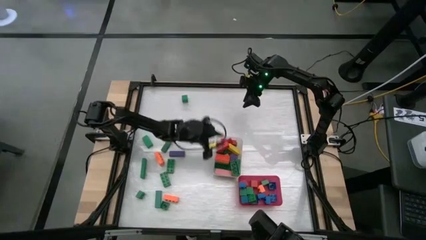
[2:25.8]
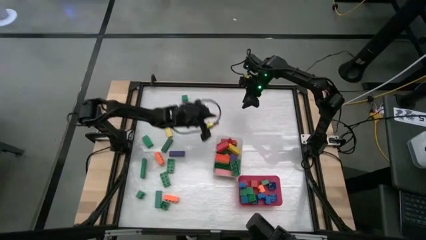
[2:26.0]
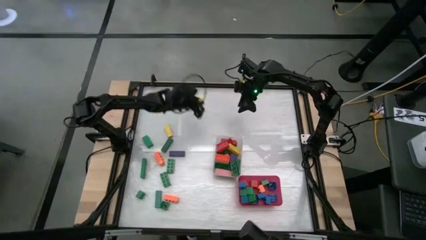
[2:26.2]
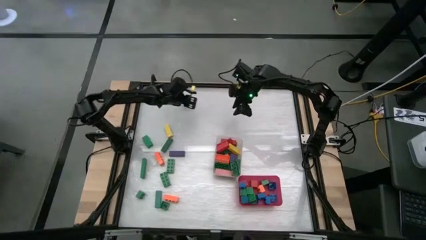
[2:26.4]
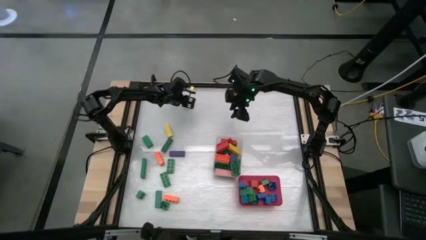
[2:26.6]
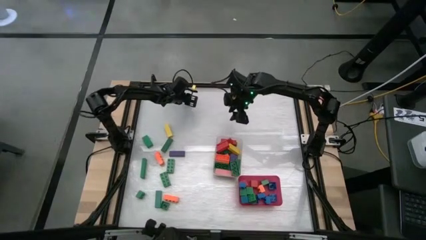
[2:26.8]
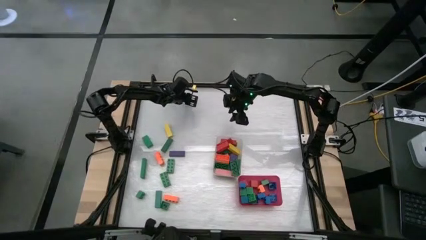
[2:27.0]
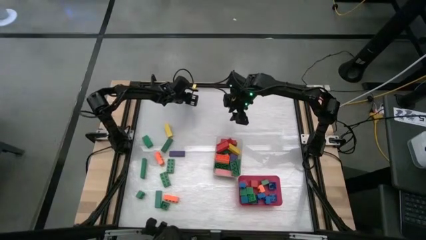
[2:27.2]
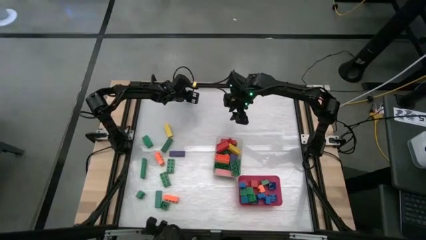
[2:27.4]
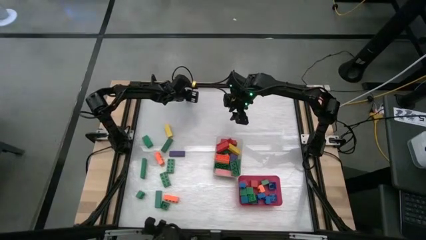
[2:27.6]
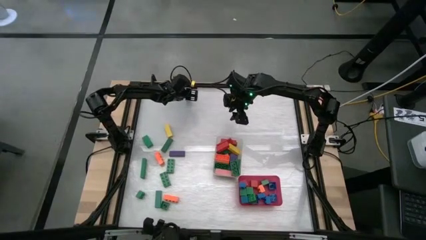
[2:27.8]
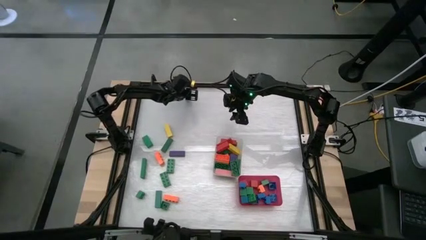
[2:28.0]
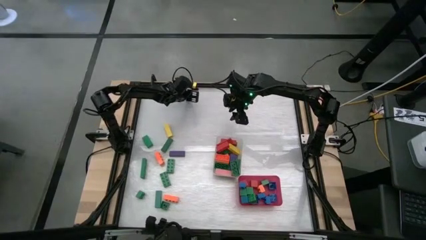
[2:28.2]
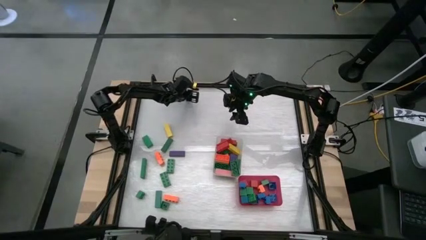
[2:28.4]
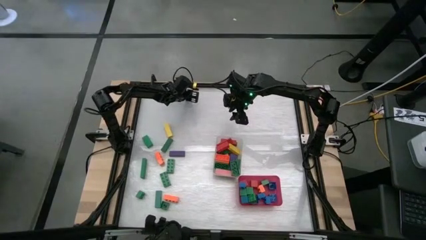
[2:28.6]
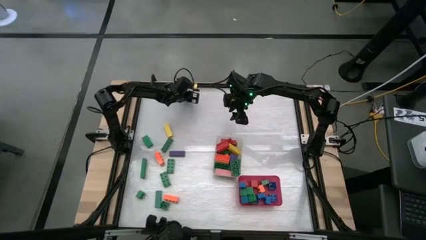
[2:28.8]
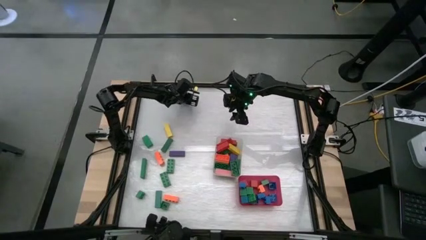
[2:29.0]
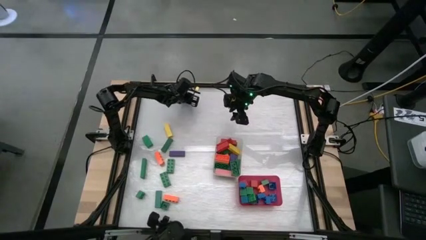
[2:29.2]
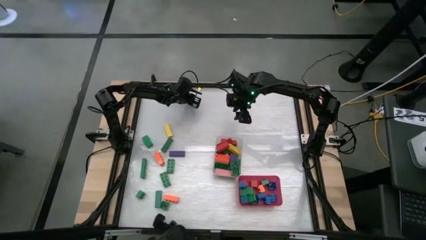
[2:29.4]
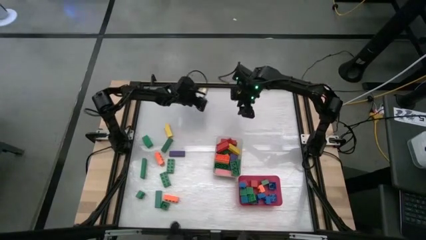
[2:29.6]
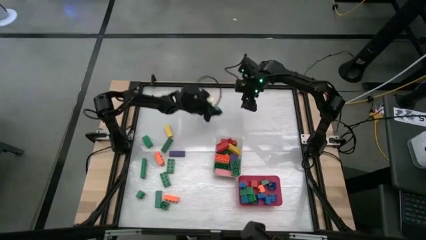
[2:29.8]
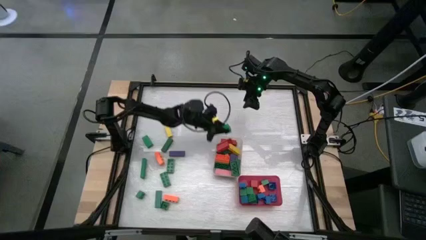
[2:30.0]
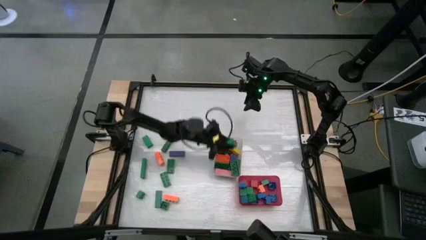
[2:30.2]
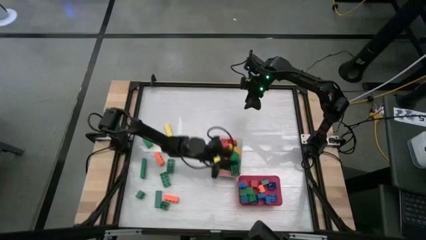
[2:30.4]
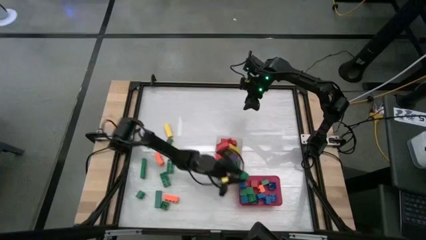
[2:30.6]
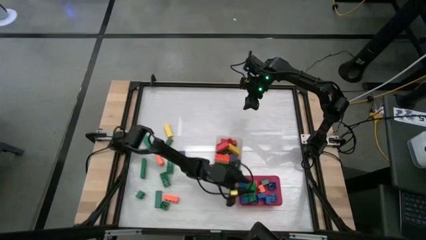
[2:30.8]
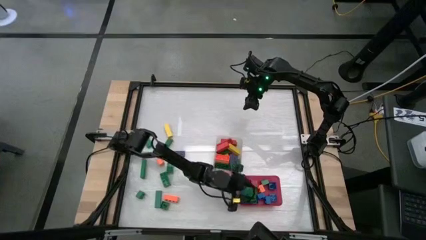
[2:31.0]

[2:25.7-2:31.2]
Task: Sort blocks by size
Put the green square block into the red bin

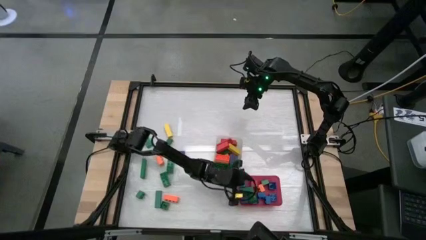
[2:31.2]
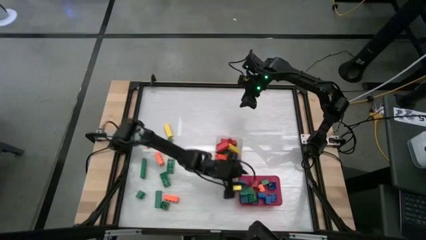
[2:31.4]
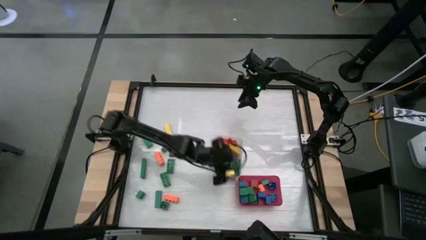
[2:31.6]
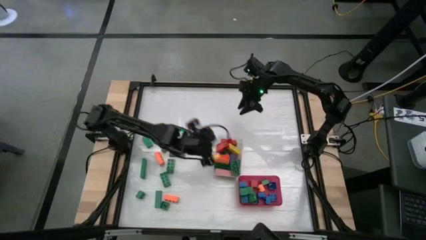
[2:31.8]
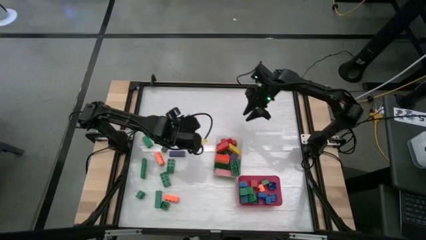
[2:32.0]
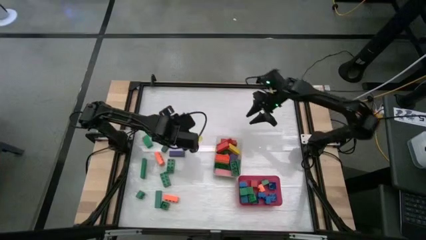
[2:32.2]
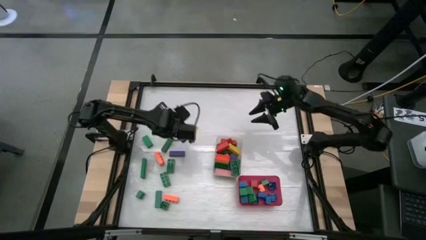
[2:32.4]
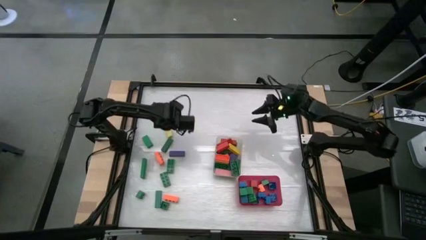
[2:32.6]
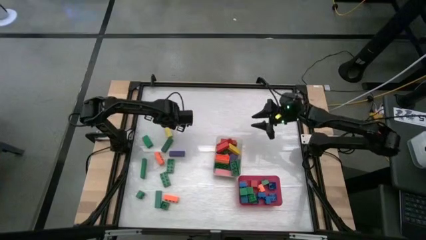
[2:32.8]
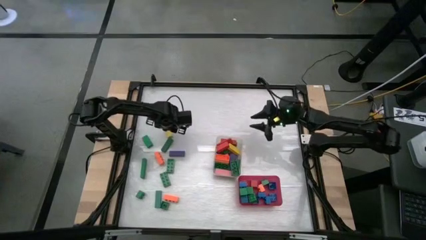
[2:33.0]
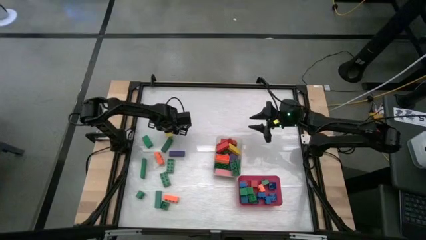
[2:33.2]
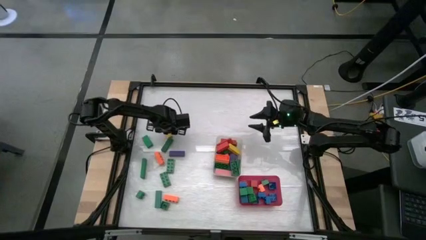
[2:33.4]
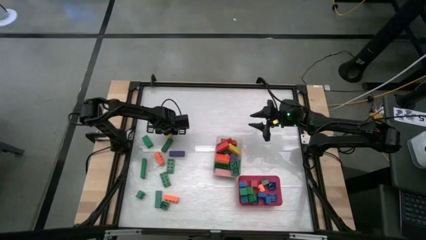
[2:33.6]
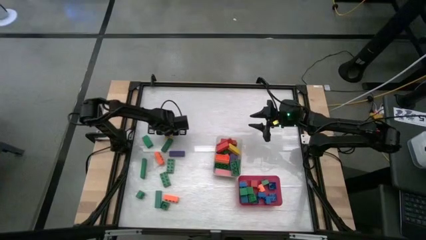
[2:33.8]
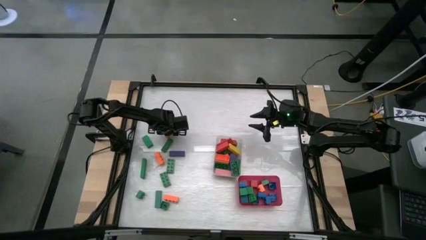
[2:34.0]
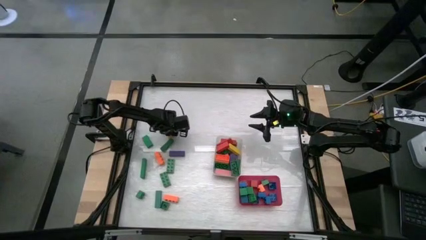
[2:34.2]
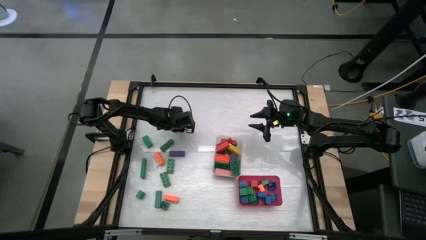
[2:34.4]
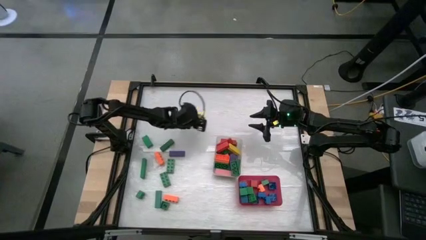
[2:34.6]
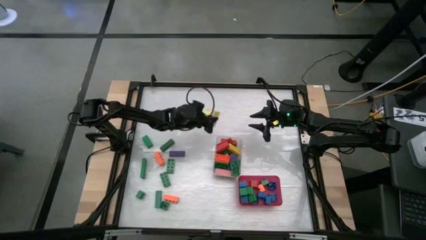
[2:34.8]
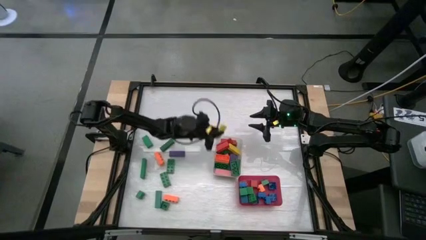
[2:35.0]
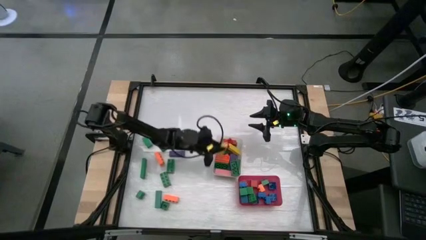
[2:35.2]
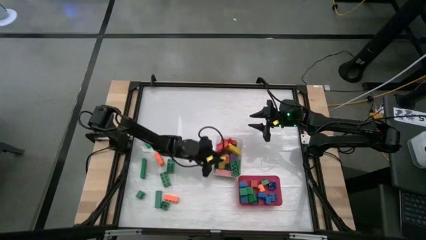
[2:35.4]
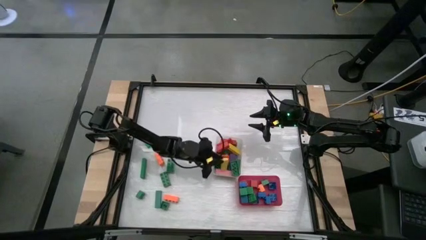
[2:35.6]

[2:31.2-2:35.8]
Put the yellow rectangular block into the transparent bin

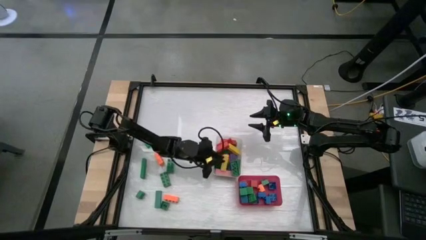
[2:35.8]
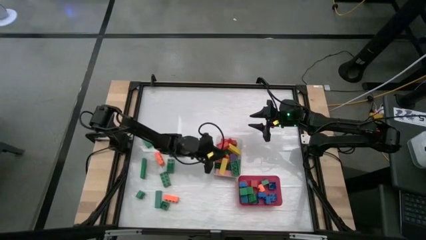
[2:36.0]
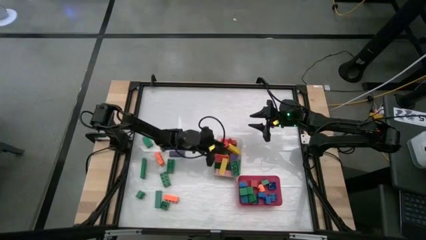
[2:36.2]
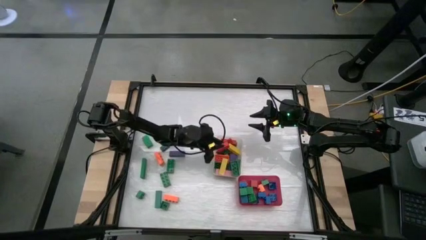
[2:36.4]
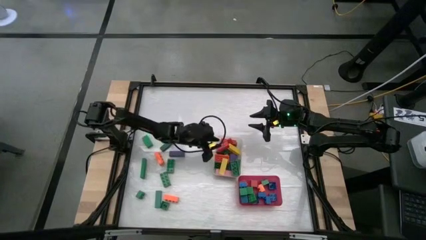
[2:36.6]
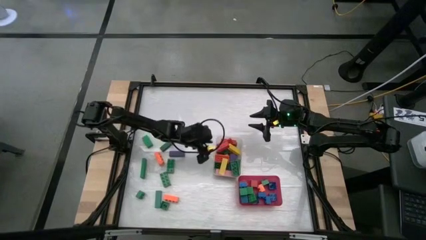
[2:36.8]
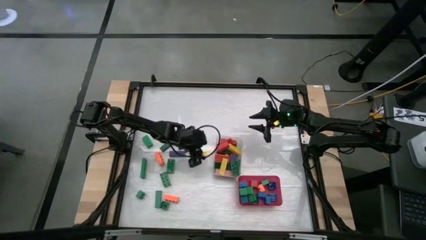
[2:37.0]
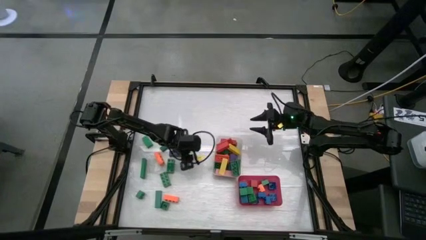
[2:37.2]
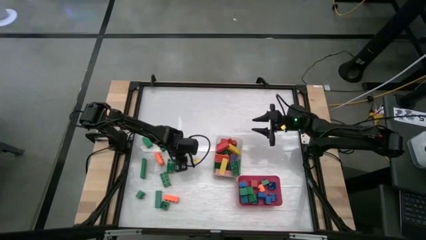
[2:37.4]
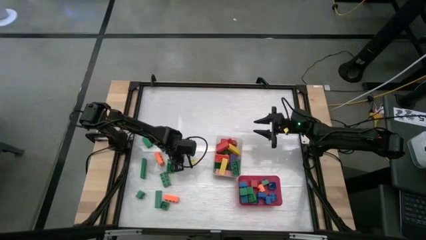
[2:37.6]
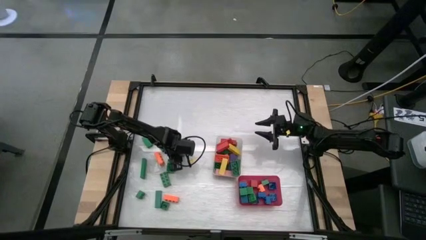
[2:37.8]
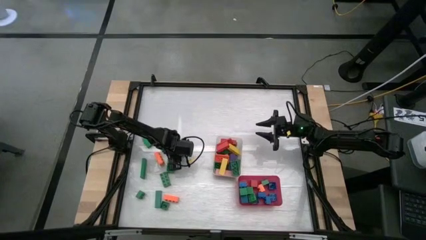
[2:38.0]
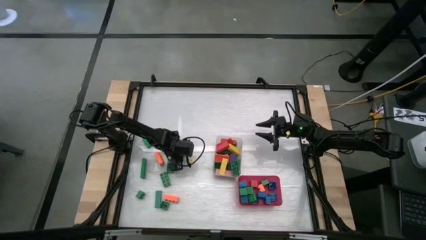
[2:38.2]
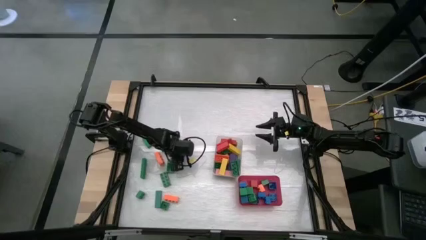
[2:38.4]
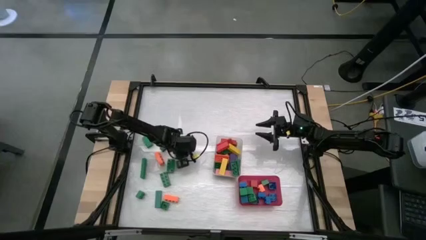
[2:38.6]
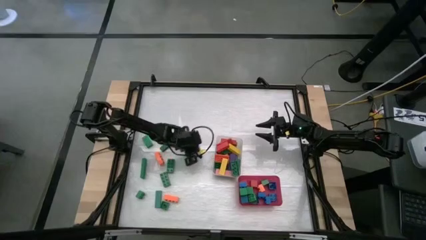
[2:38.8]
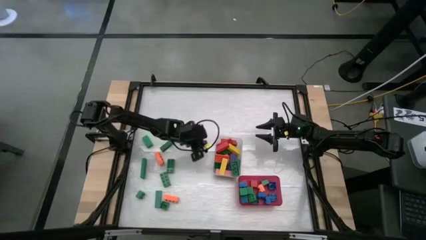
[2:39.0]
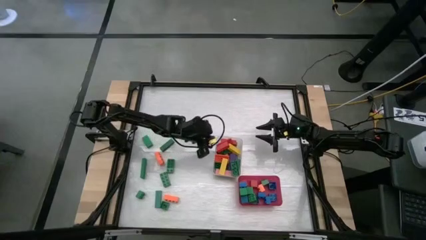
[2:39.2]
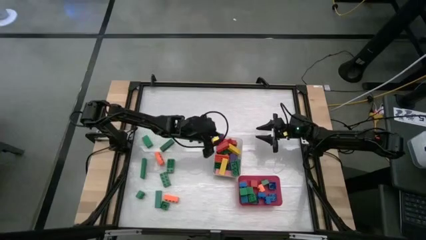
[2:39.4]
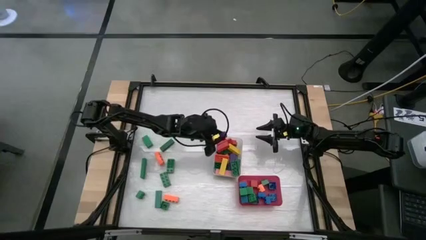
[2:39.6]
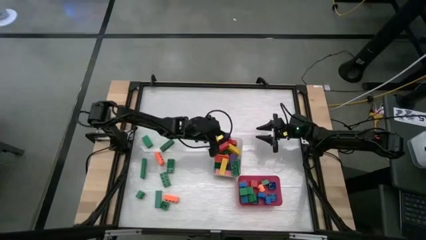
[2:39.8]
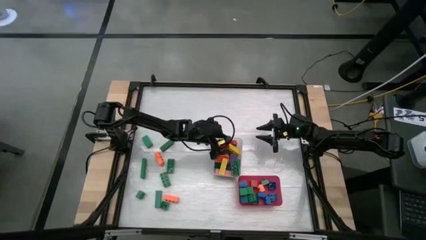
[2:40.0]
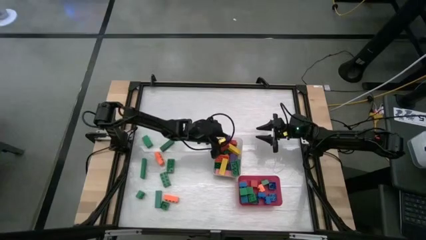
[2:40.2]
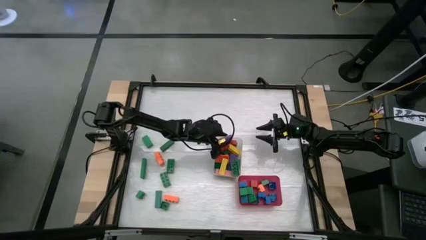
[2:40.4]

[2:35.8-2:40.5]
Put the purple rectangular block into the transparent bin

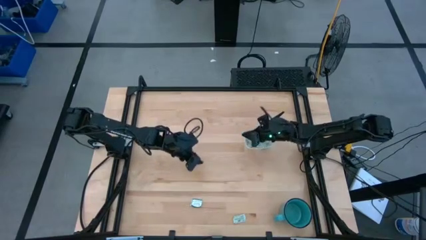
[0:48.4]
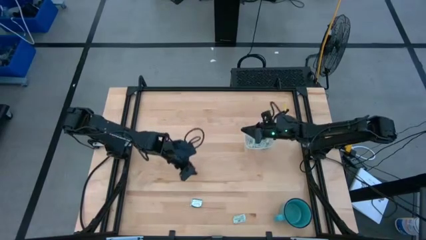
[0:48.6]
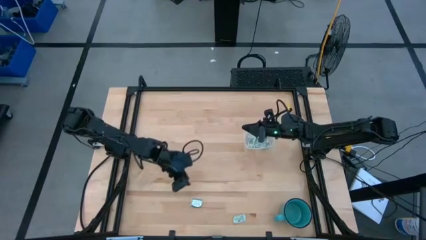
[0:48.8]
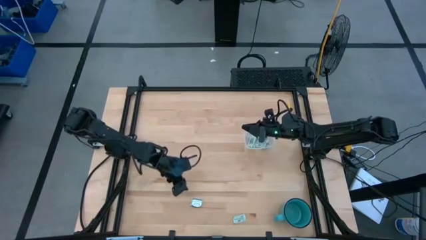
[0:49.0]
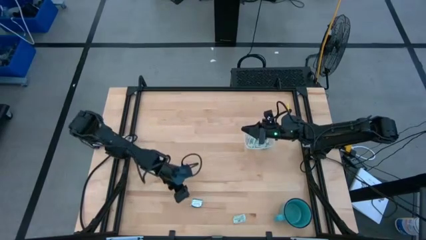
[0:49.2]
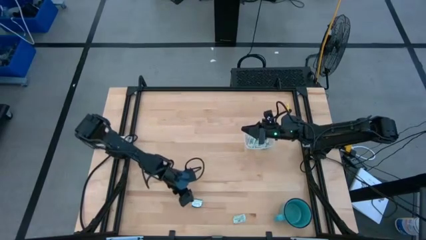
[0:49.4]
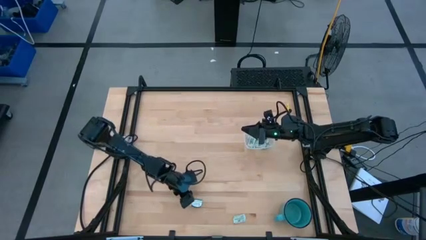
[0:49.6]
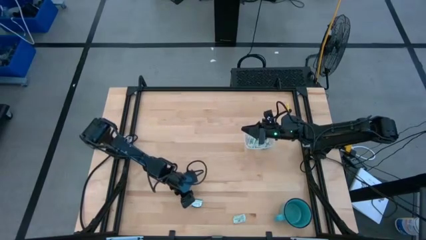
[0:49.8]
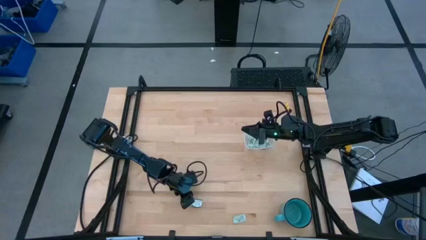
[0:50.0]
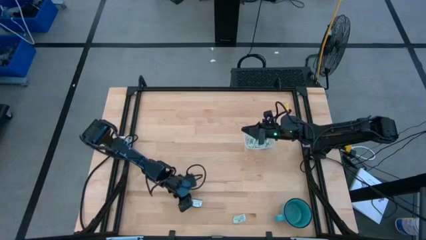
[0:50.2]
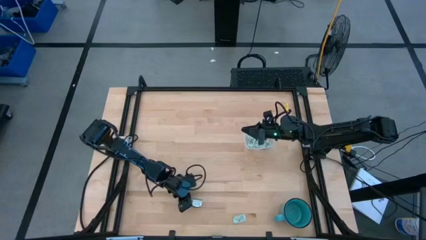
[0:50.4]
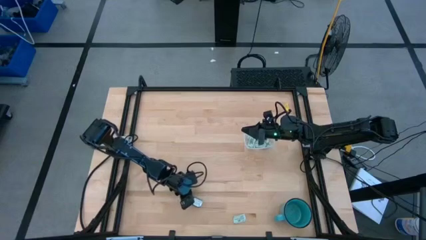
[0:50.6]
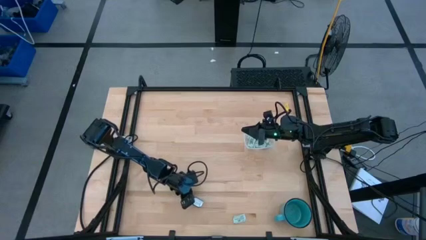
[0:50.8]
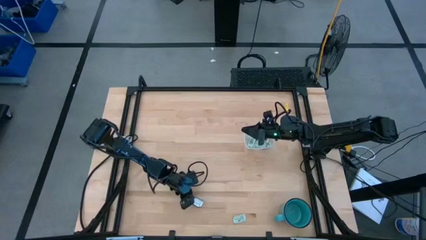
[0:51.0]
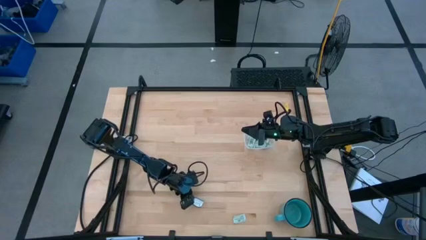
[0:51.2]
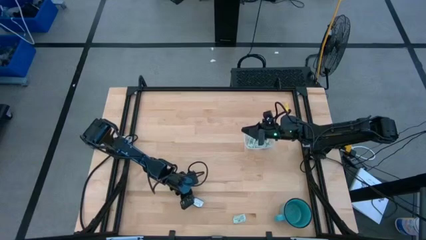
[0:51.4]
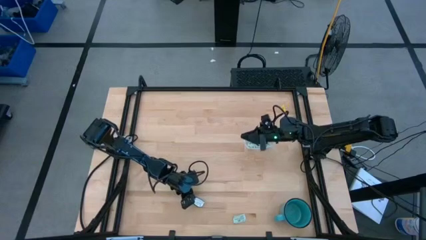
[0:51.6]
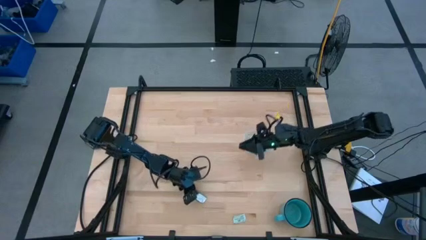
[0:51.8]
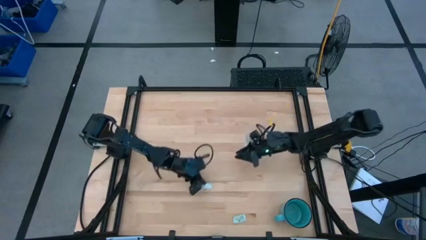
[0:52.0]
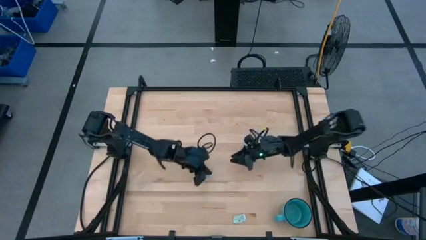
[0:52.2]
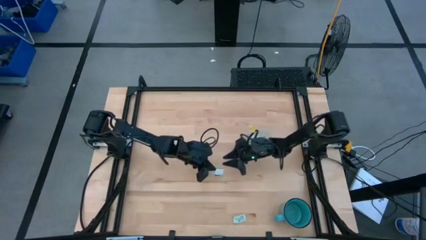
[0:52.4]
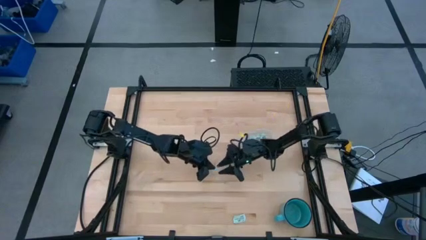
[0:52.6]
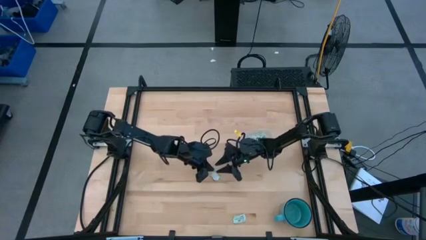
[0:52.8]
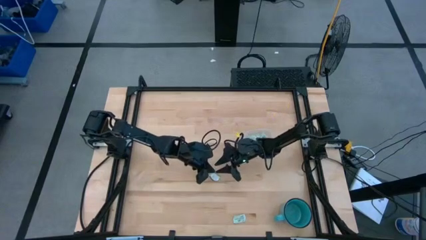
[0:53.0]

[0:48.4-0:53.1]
Task: Pick and place Stevia / Truvia into bins
Put the white truvia packet into the transparent bin
